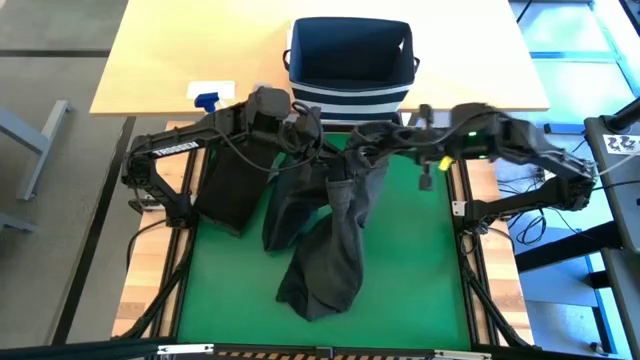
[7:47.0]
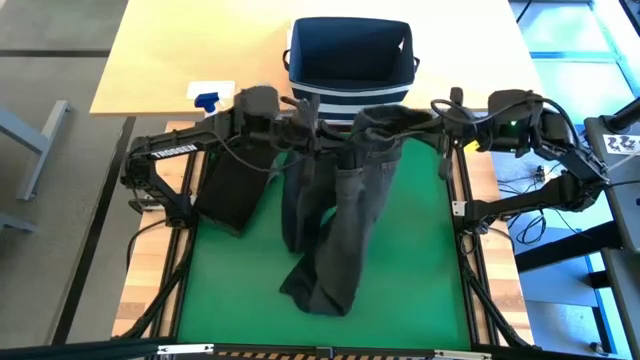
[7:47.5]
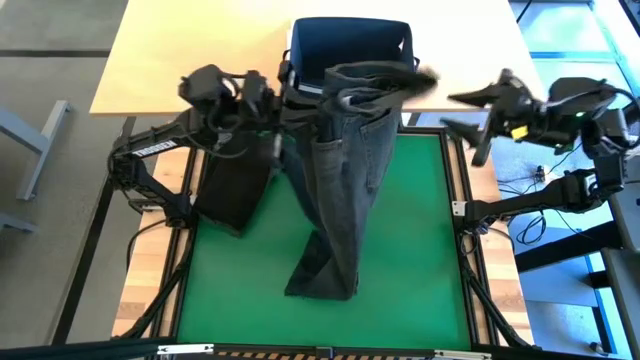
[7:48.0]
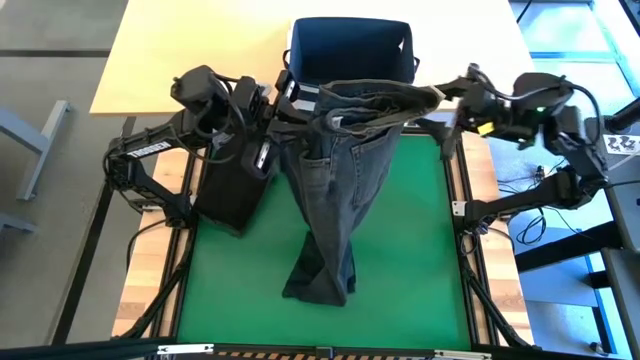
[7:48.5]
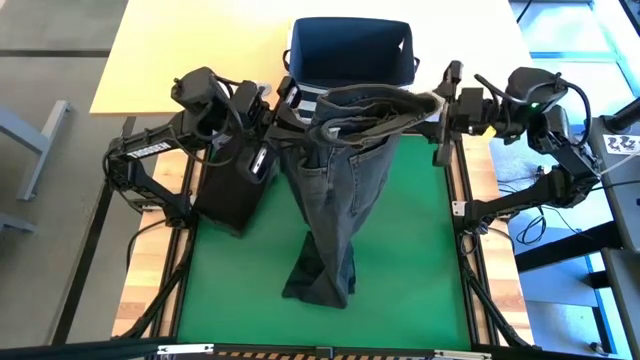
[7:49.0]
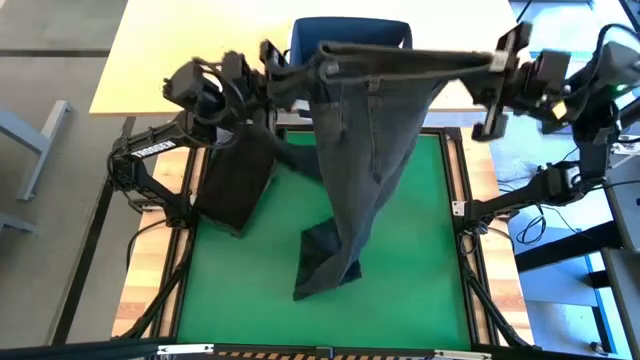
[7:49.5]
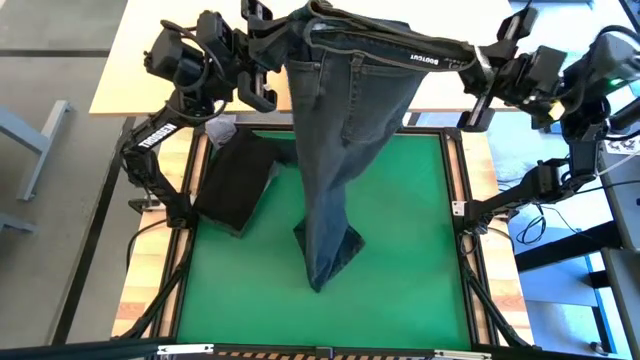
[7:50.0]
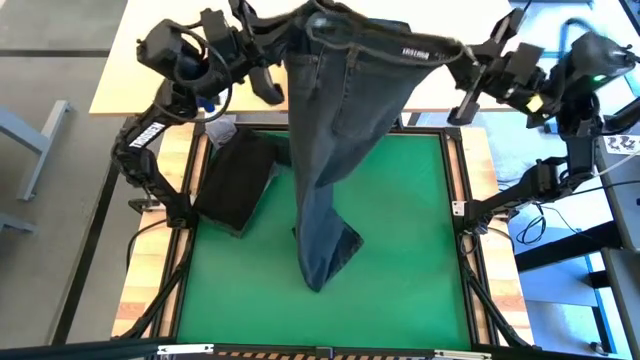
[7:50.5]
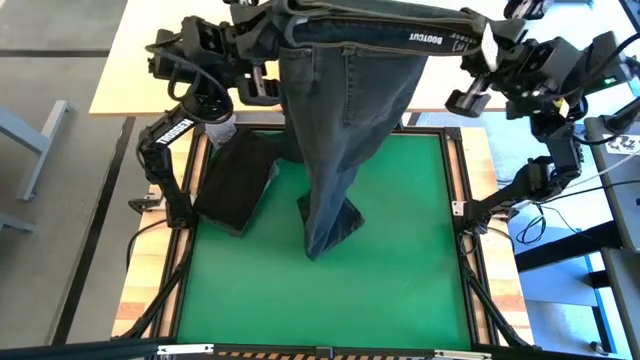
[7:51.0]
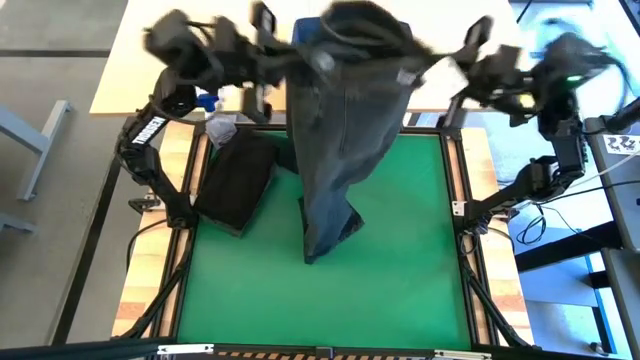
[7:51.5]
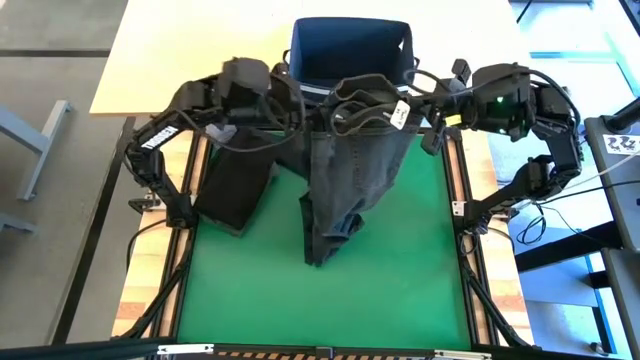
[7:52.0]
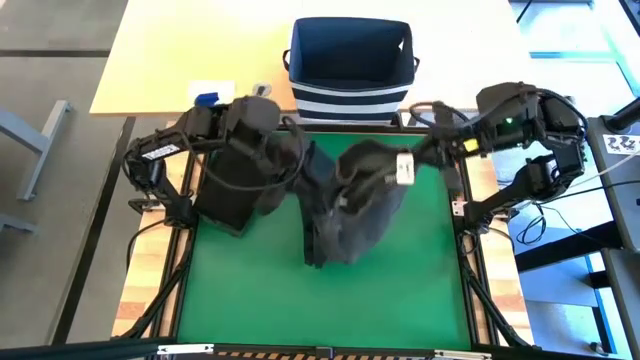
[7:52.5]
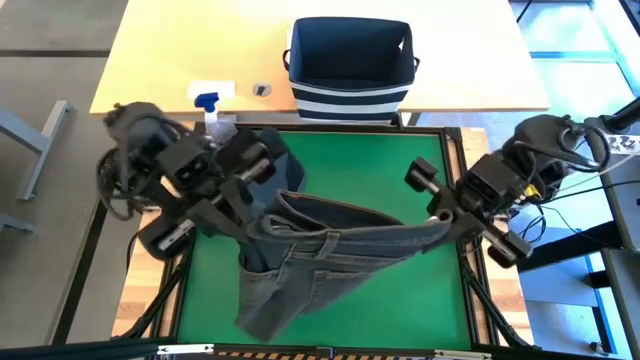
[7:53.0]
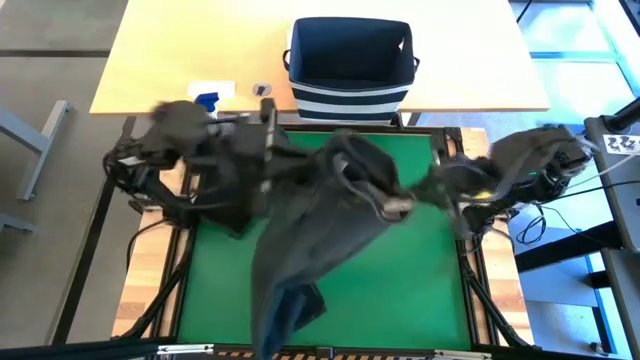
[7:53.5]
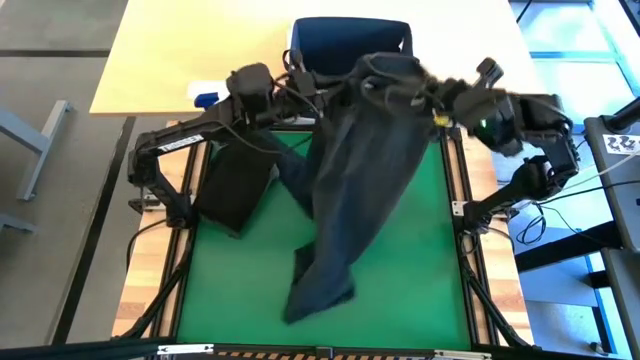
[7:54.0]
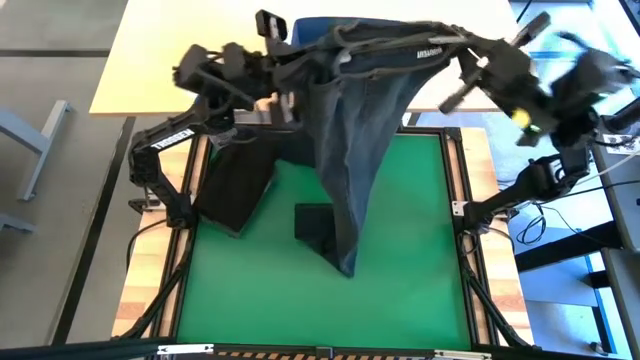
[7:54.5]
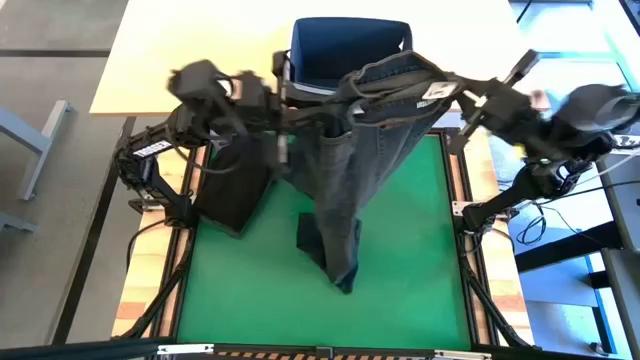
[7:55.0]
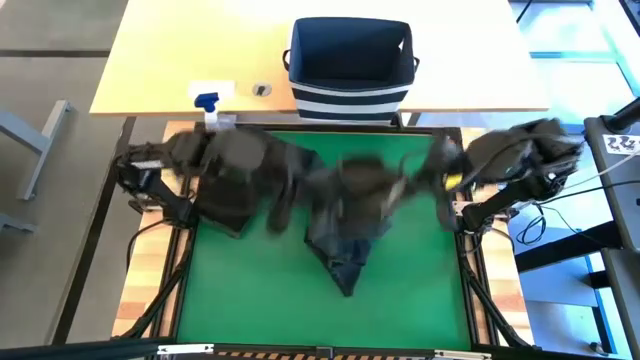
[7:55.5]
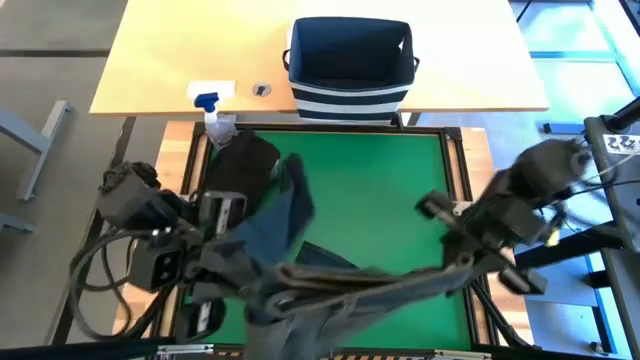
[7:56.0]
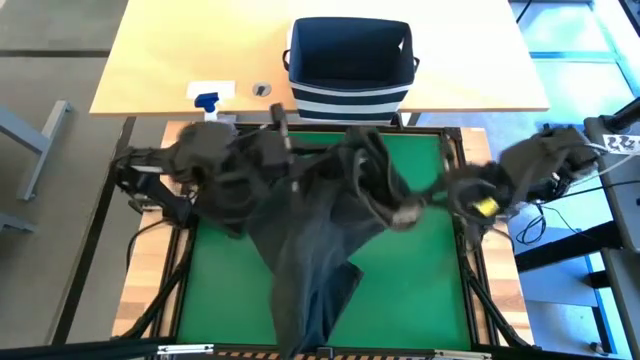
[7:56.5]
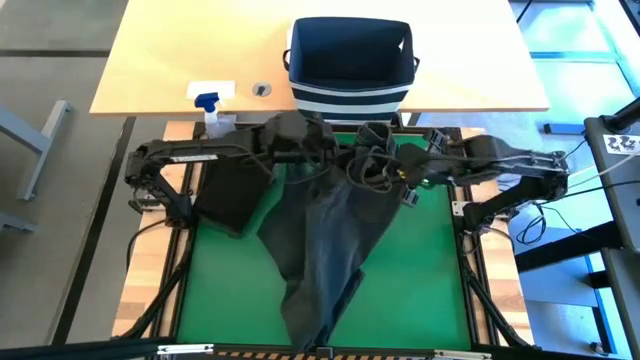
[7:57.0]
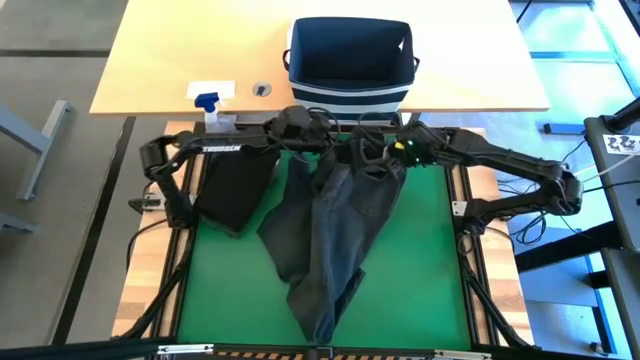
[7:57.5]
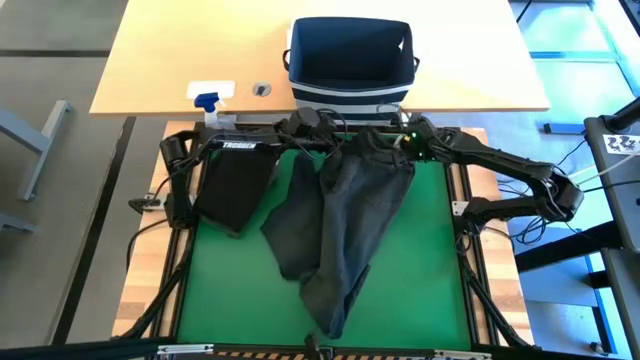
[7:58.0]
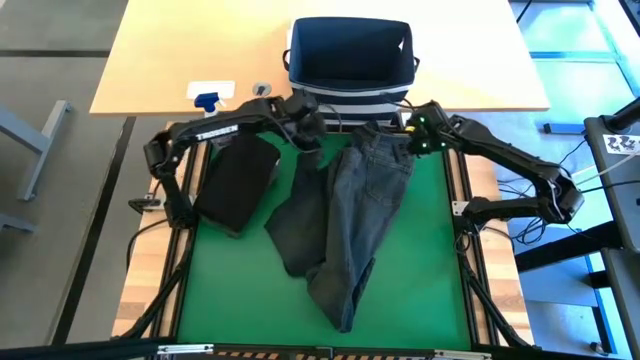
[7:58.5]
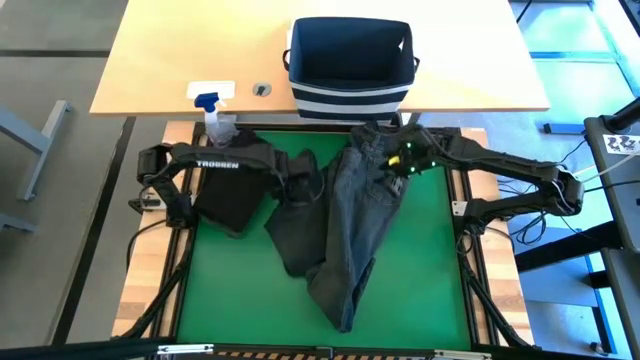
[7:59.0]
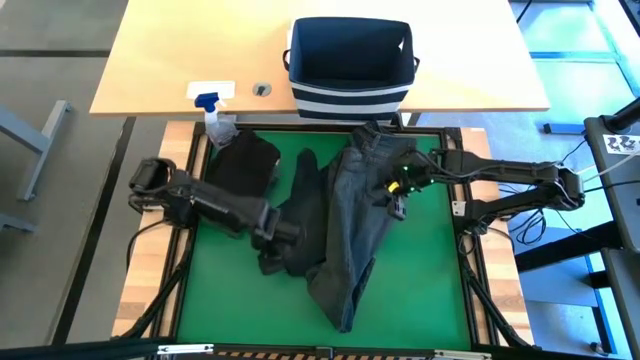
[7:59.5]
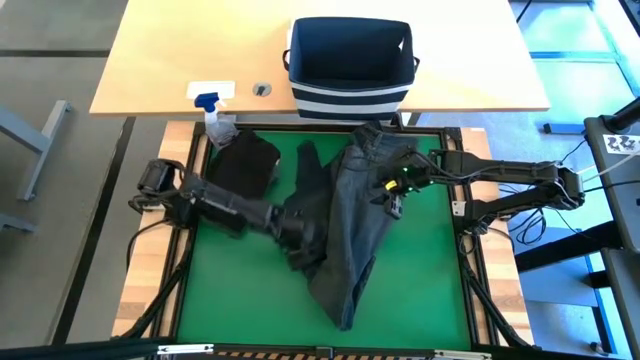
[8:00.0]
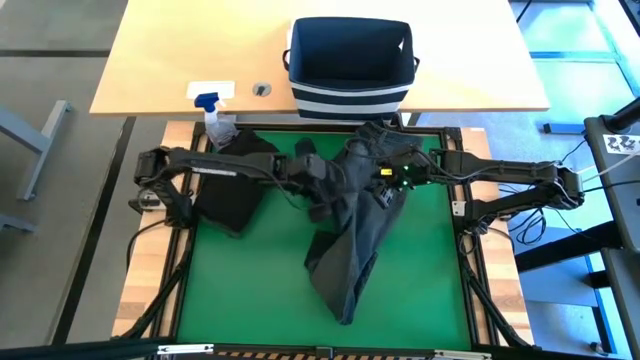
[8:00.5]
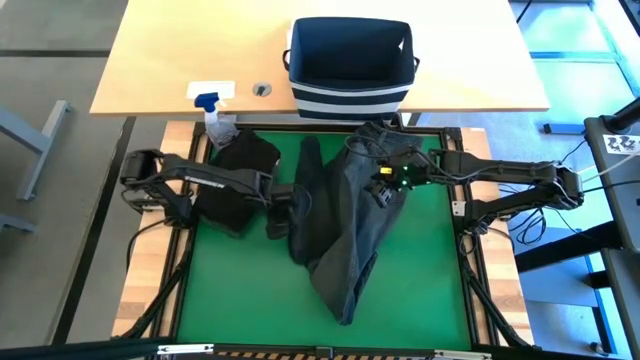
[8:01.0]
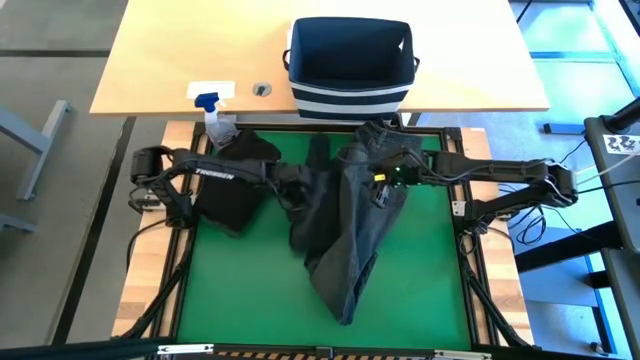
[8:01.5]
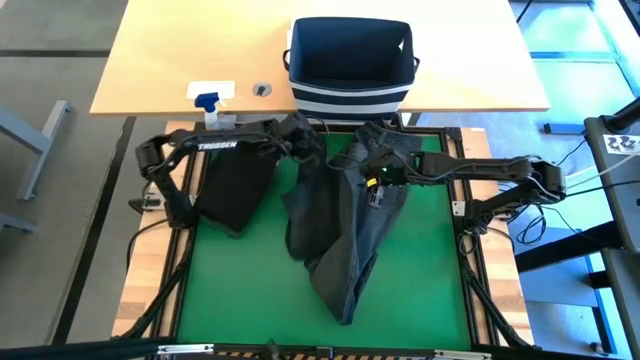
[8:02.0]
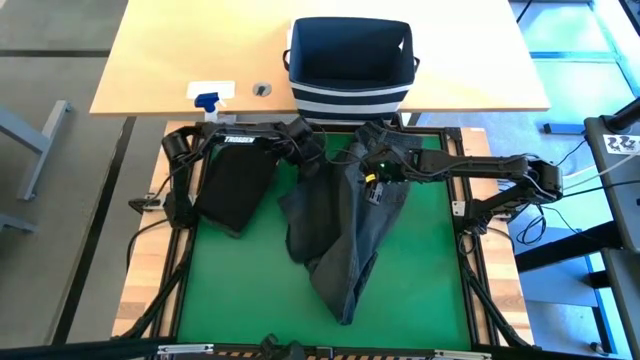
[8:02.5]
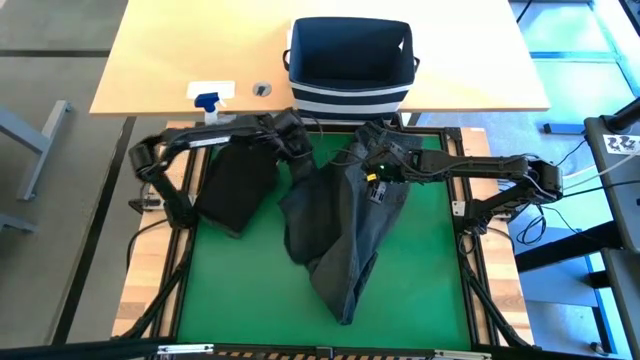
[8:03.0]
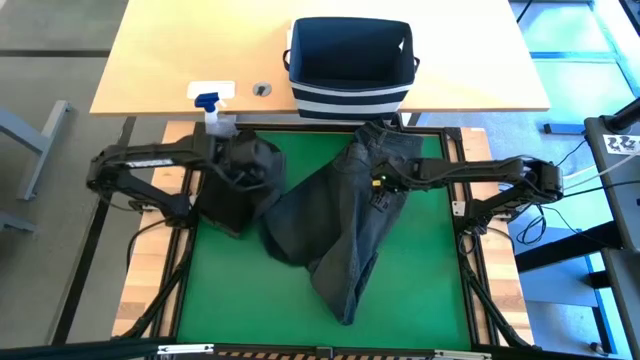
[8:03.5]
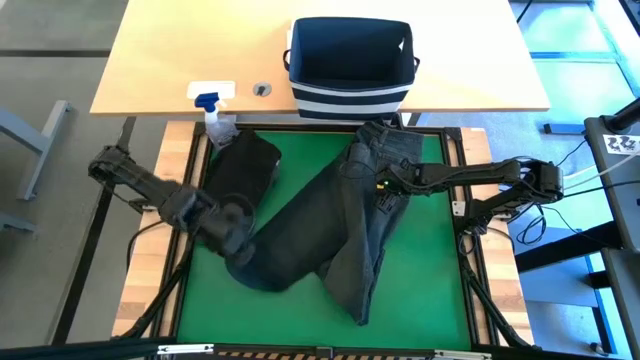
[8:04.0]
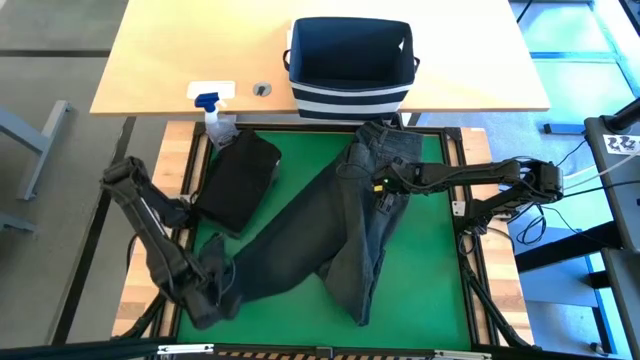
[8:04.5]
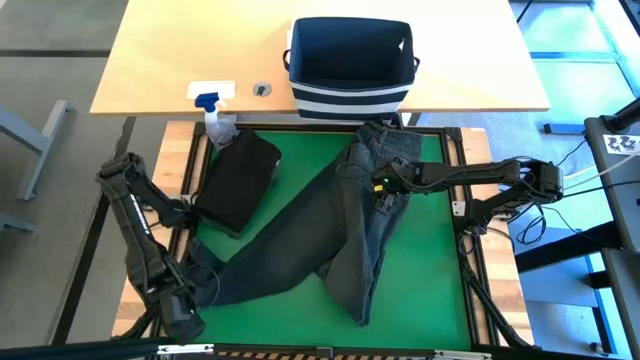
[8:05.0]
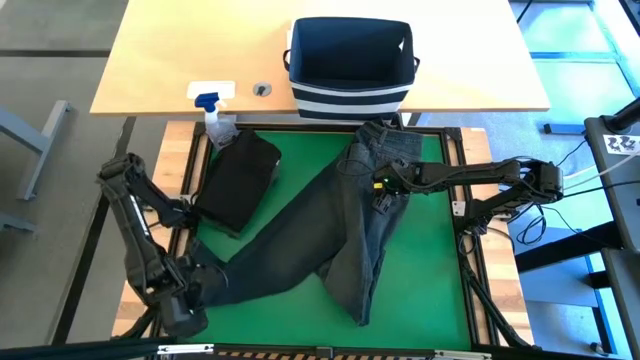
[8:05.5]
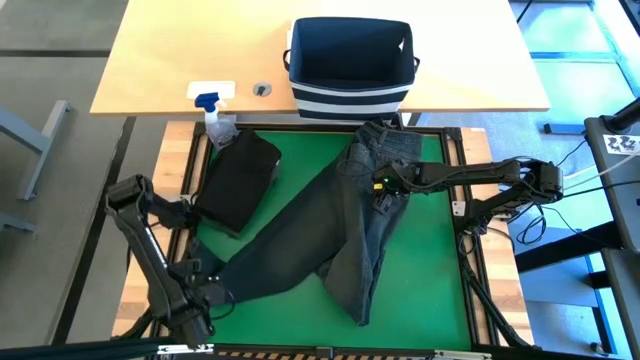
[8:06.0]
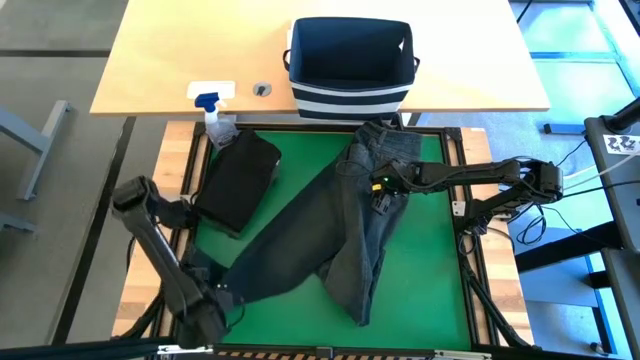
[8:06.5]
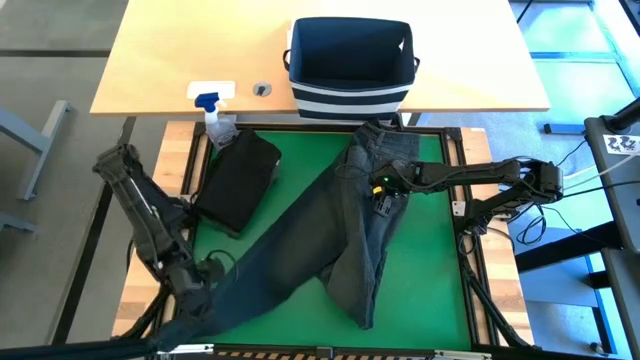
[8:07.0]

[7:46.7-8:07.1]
Task: Fold Laundry from Bin
Fold the blue pants

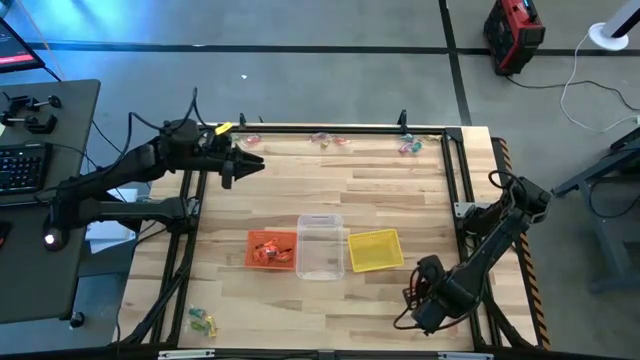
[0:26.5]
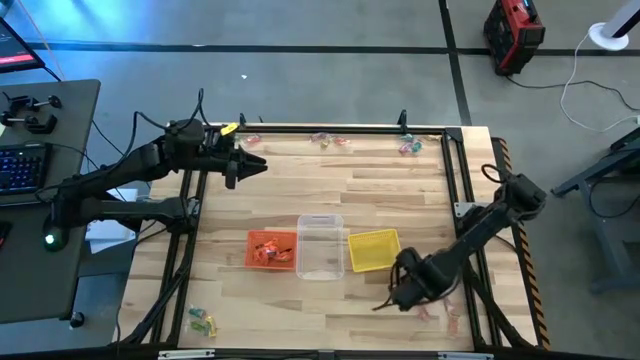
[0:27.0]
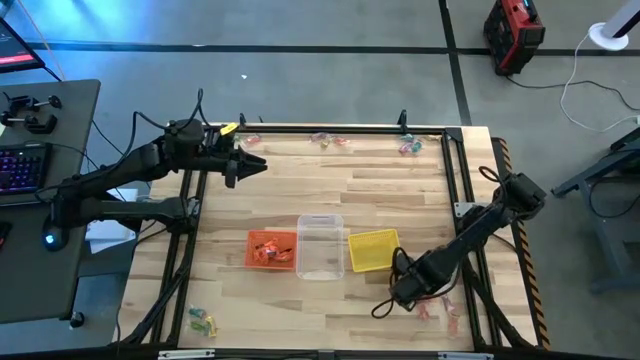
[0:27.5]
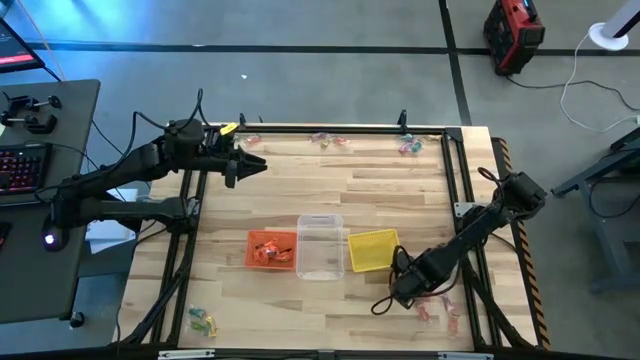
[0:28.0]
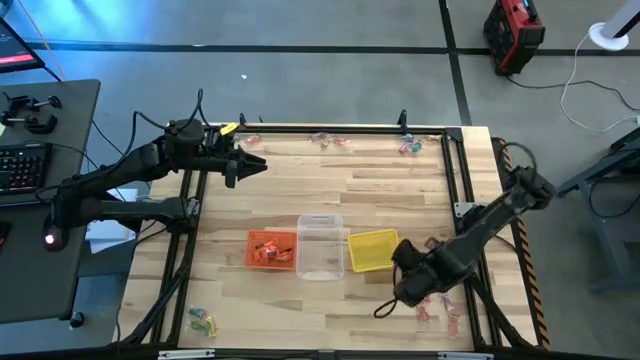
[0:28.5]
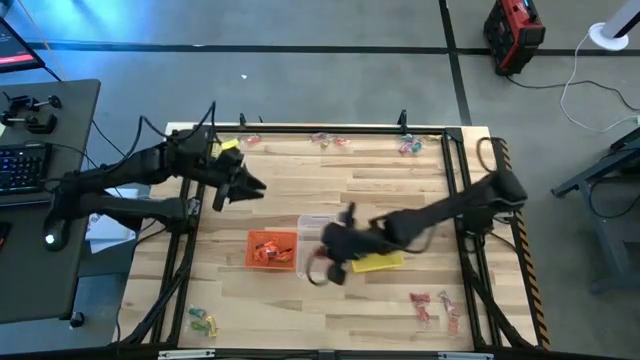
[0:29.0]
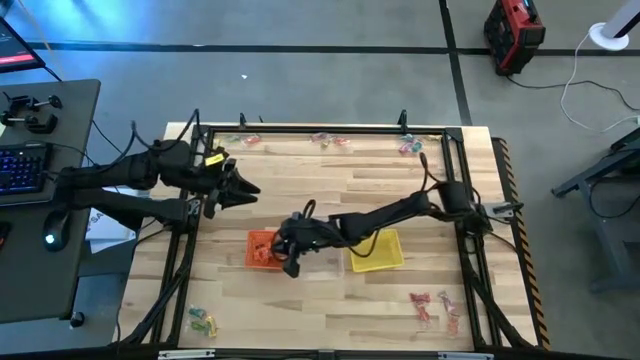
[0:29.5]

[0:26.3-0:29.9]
Task: Sort candy by brand, put in halloween buckets
Put the orange chocolate bar into the orange bin
